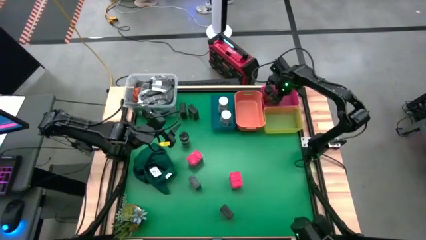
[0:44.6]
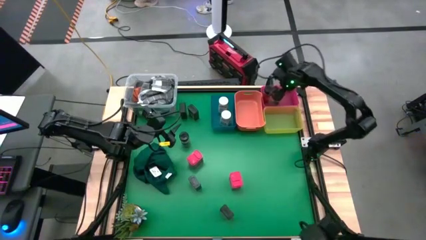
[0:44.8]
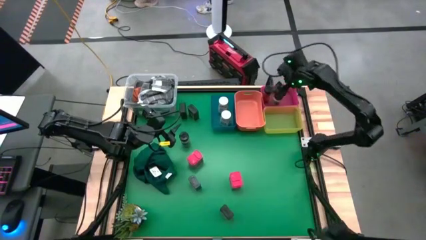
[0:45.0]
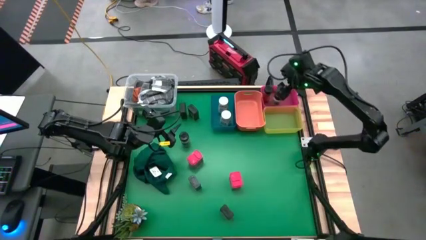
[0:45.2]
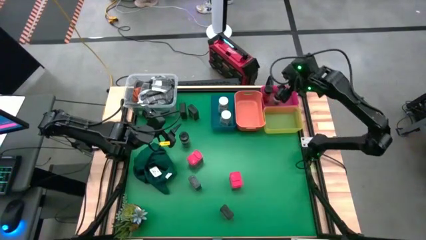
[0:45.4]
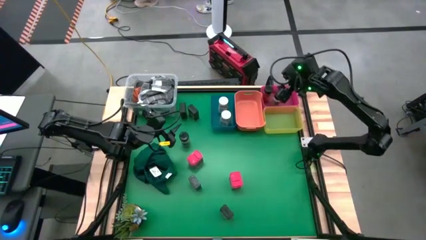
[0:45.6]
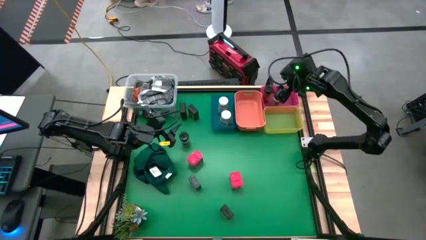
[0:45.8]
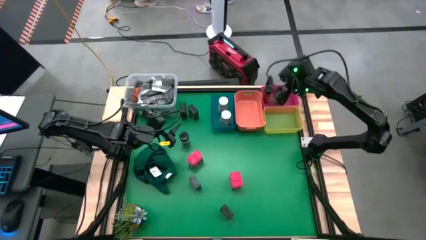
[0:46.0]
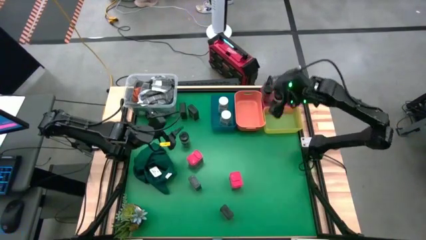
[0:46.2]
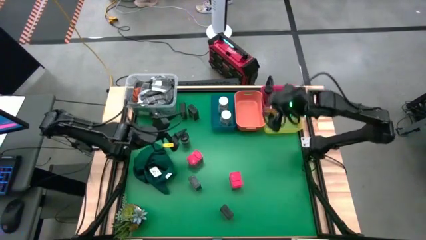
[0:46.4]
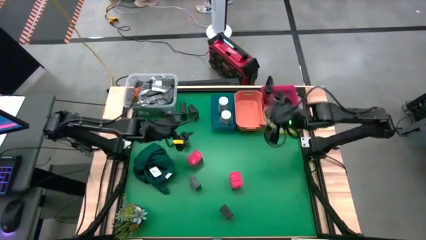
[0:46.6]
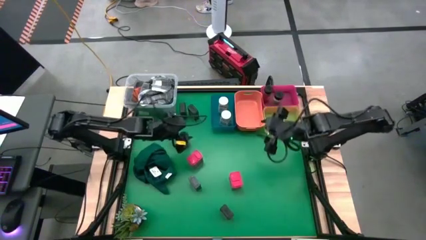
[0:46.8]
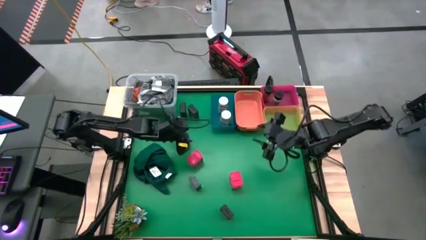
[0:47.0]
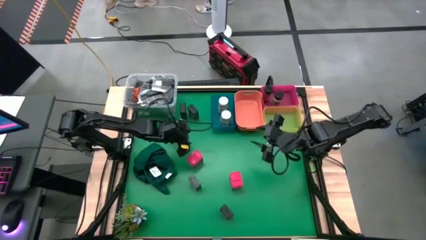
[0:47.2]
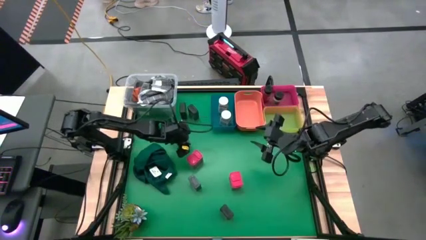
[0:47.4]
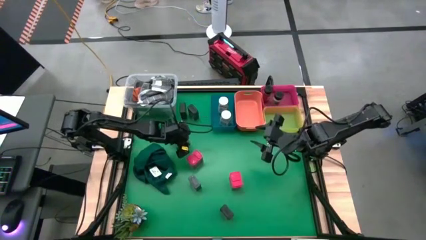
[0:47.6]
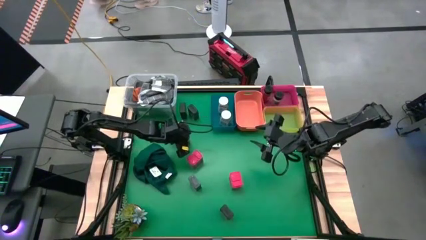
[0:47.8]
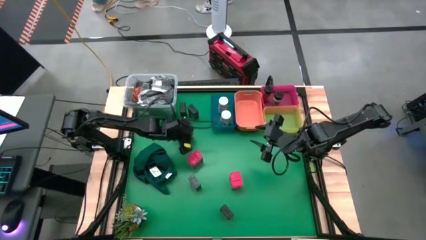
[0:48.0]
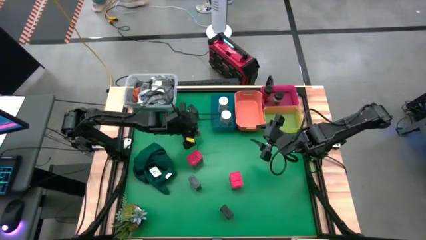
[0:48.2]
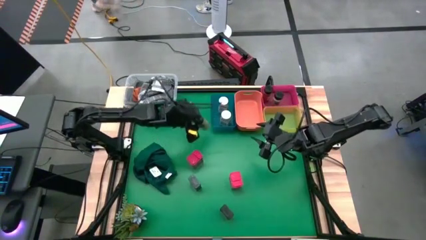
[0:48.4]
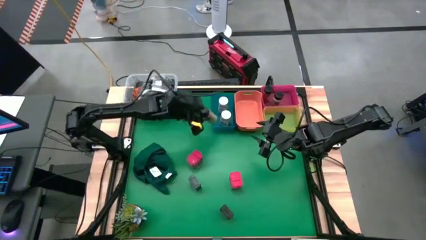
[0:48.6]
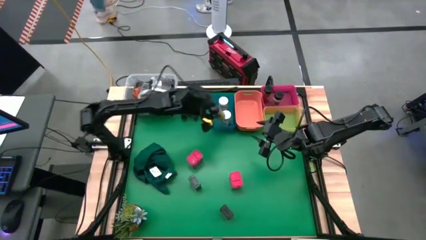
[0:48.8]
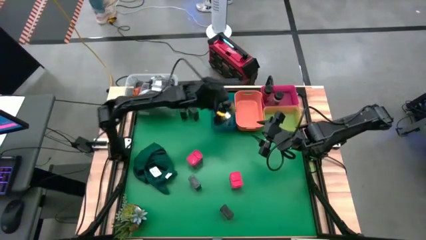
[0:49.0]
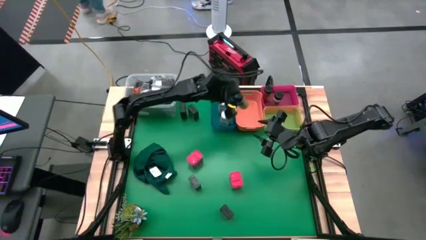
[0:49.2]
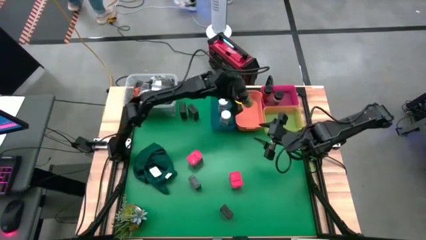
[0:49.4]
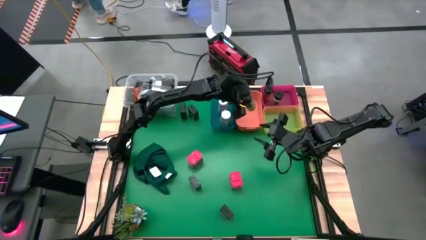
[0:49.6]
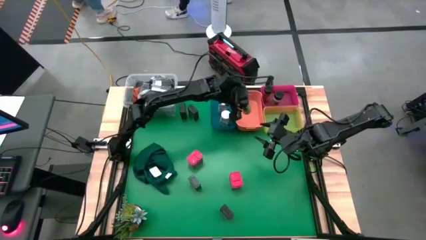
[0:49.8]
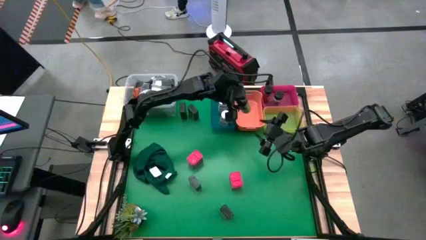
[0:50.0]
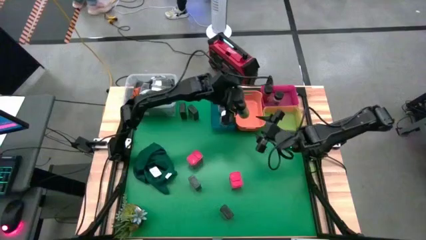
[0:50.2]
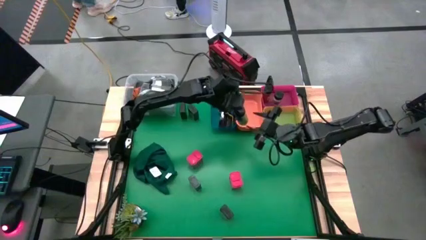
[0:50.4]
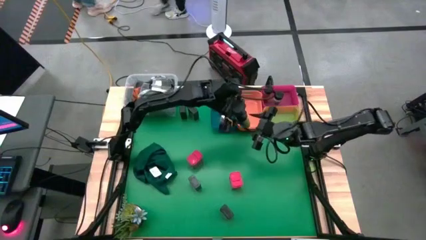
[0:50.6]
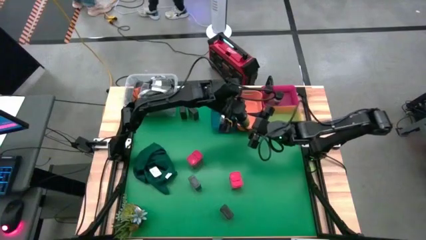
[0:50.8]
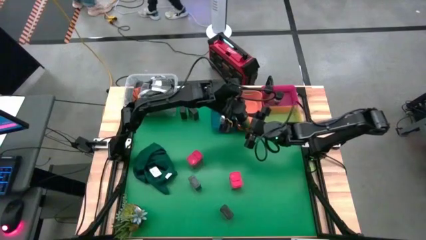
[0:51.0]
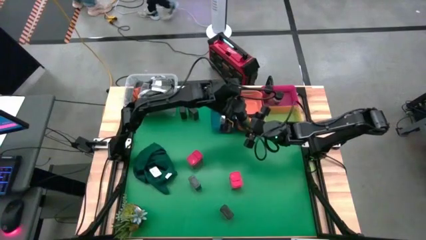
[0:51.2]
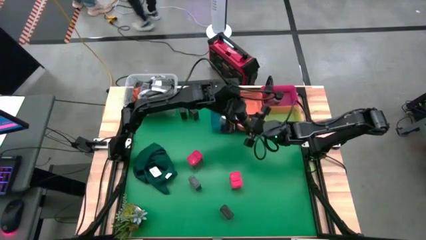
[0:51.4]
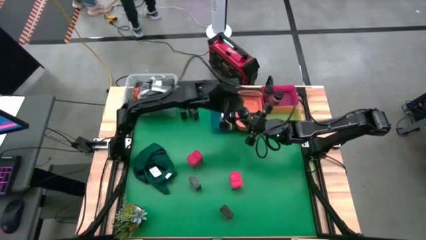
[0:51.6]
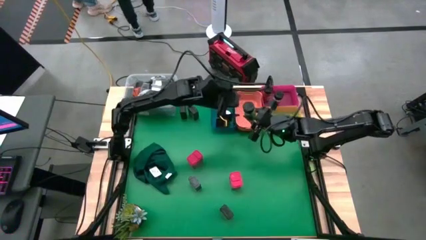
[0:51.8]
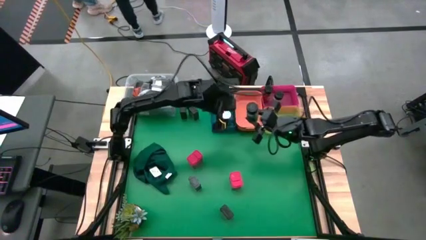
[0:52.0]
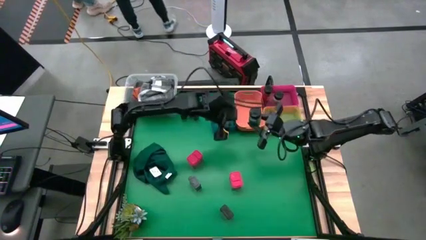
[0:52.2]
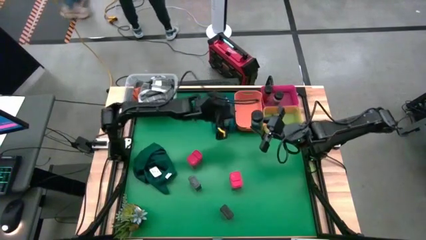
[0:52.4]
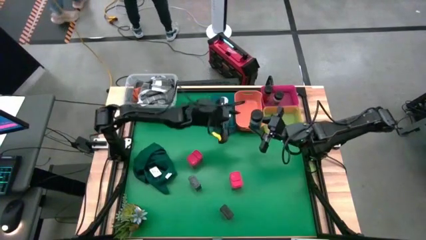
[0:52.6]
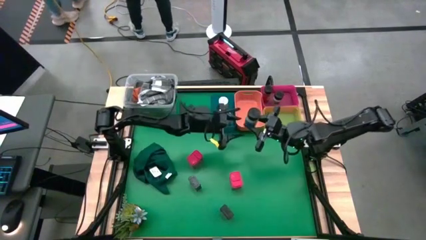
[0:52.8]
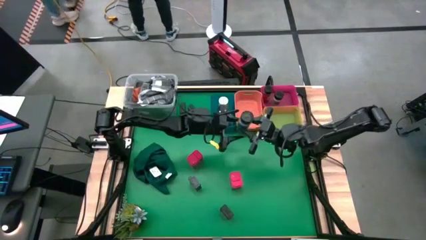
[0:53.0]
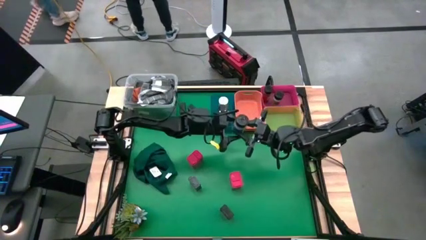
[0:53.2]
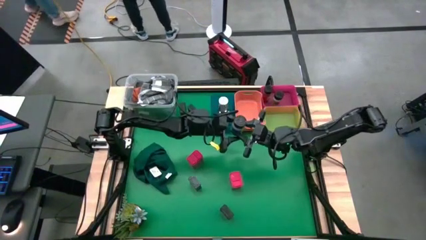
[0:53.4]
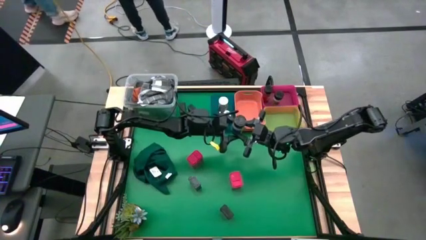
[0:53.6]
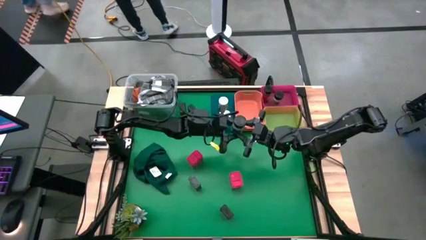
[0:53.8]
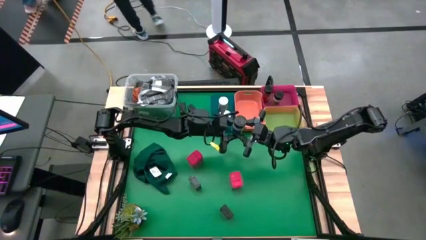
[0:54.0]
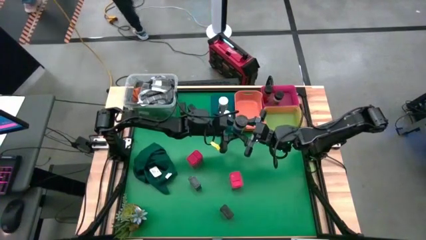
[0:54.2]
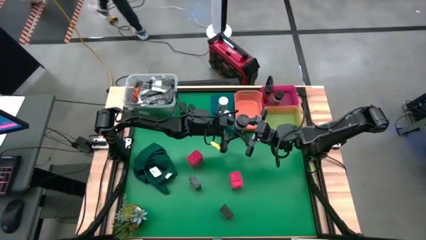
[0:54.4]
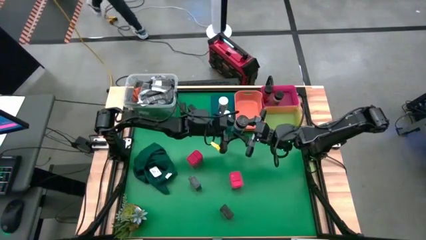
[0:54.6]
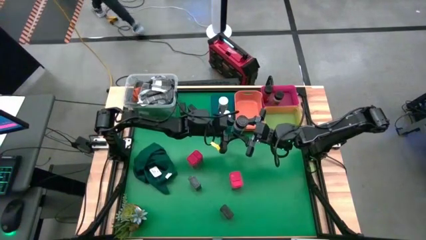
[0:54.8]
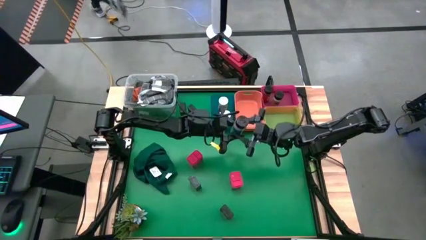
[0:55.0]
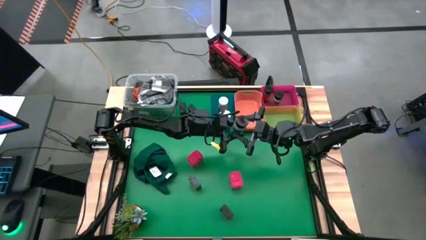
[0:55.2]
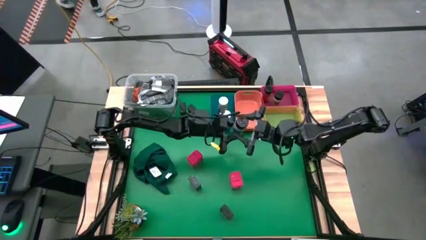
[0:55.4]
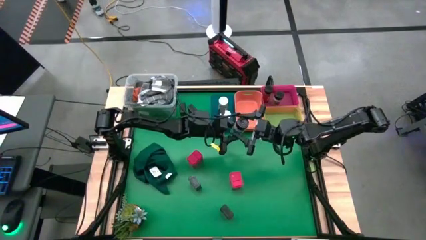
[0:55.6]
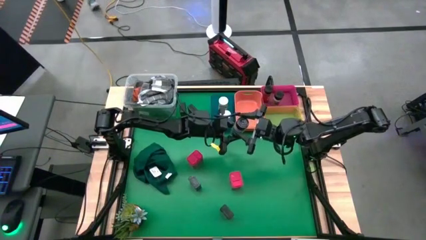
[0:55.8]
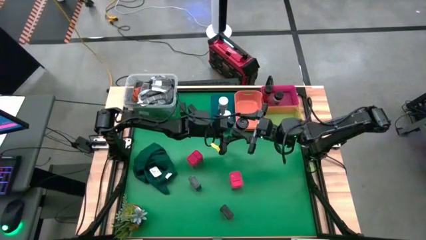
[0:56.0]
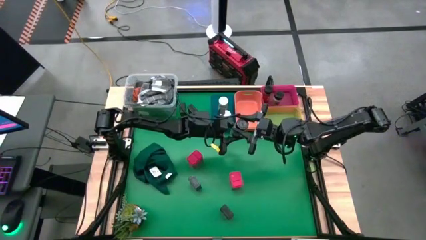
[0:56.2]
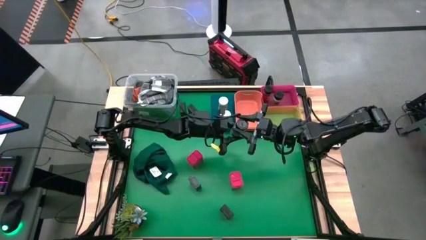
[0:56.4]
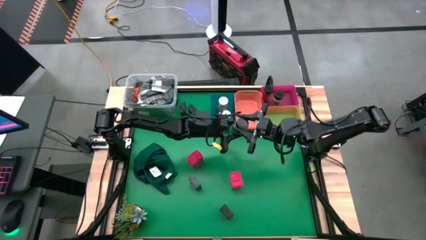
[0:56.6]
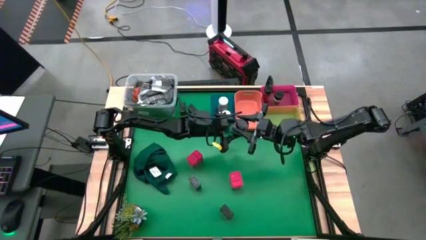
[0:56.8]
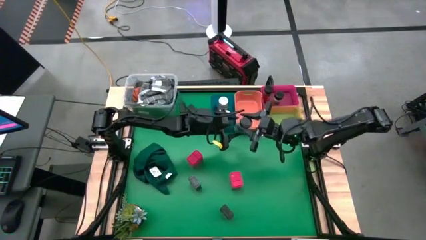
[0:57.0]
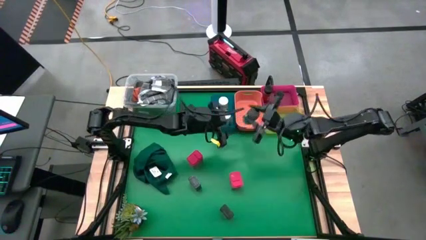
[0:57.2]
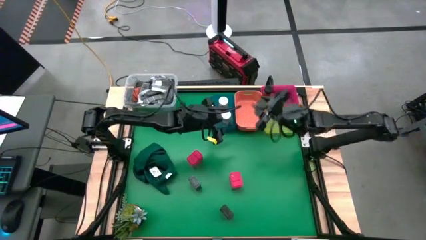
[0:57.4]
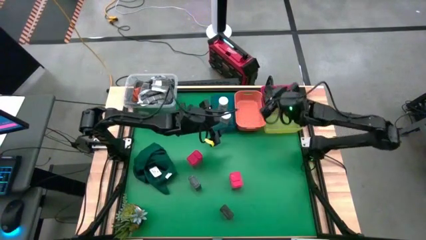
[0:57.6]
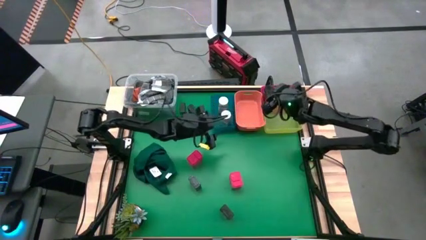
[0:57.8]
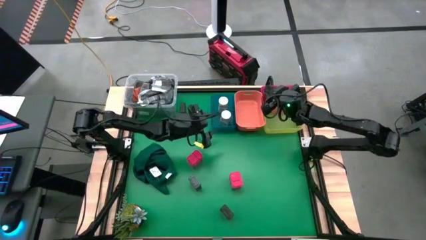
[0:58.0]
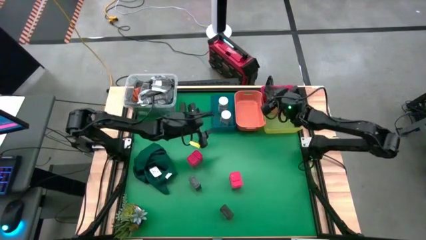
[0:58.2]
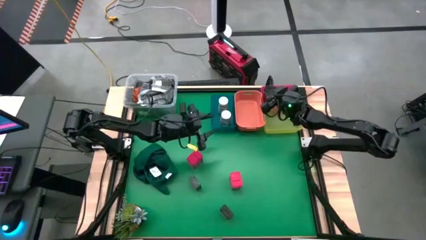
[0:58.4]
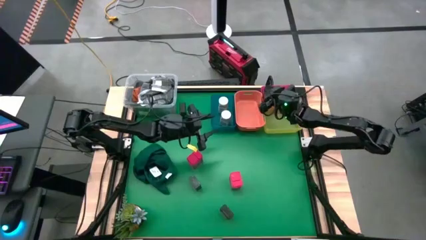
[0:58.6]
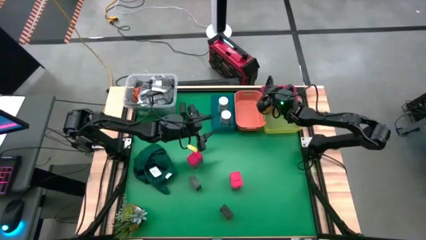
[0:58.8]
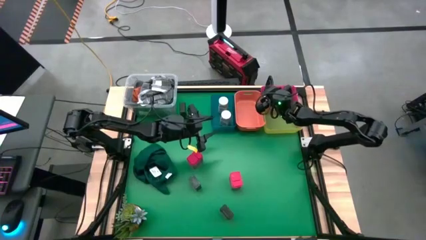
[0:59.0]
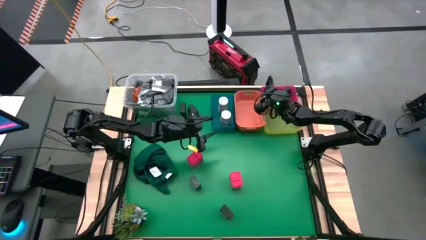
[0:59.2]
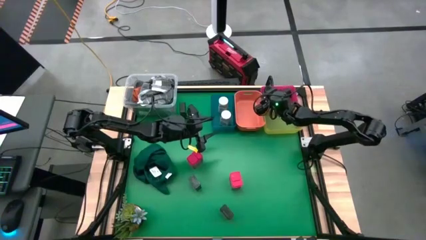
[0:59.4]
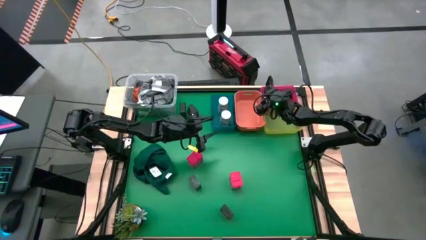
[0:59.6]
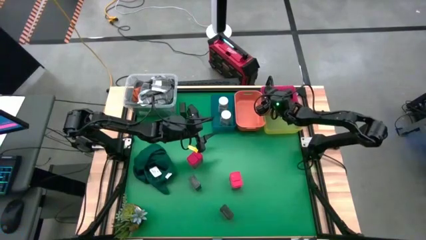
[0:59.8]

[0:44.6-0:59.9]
Task: Sort spices by type
Put the black seasoning bottle into the pink bin
